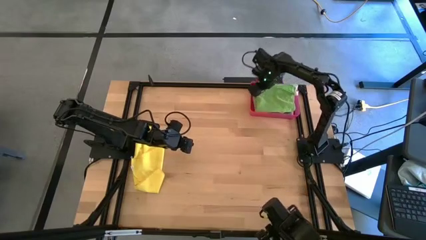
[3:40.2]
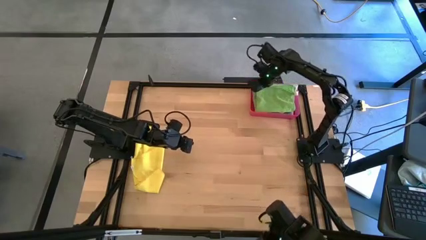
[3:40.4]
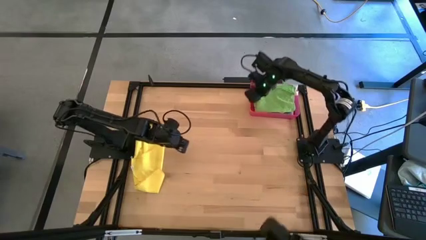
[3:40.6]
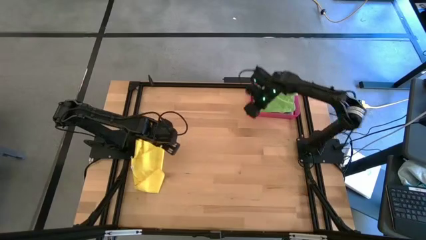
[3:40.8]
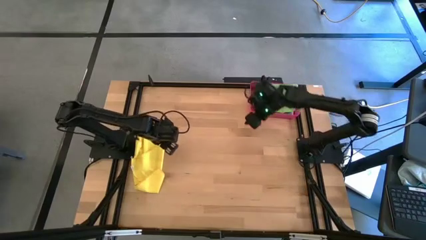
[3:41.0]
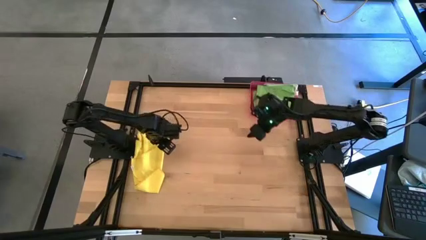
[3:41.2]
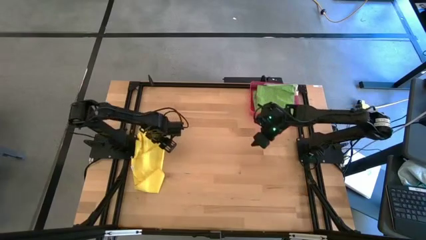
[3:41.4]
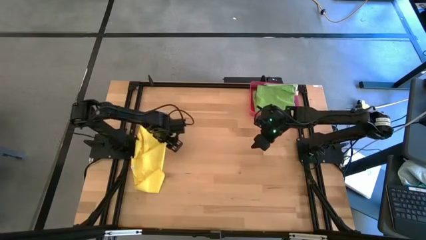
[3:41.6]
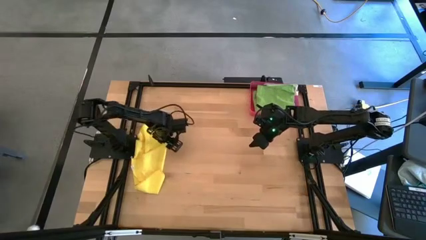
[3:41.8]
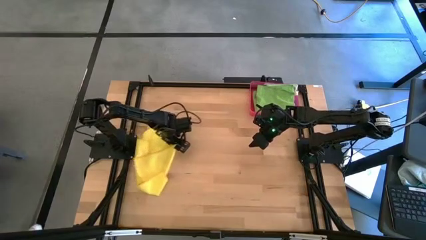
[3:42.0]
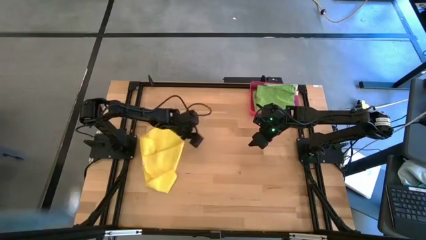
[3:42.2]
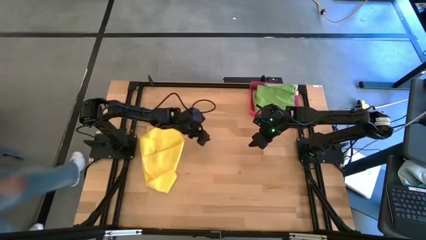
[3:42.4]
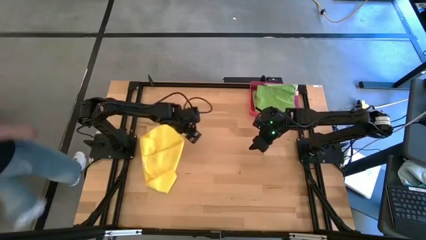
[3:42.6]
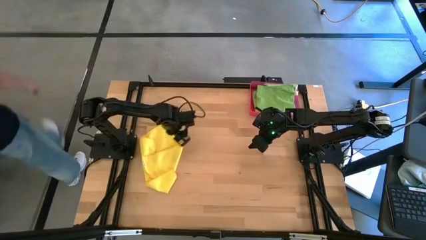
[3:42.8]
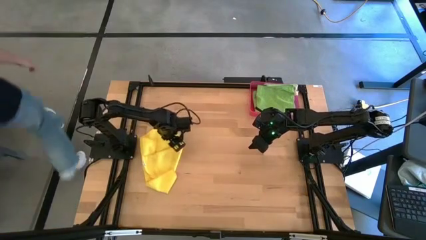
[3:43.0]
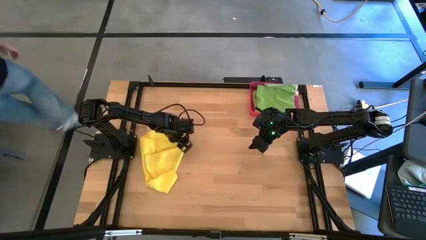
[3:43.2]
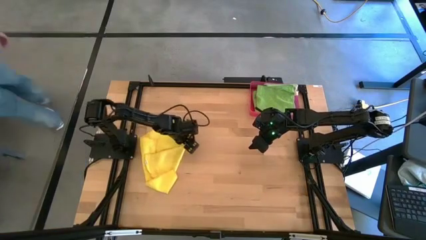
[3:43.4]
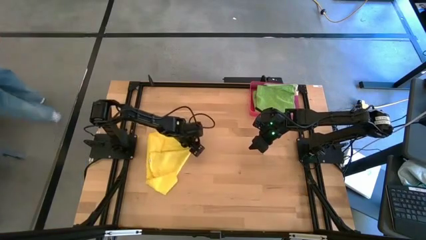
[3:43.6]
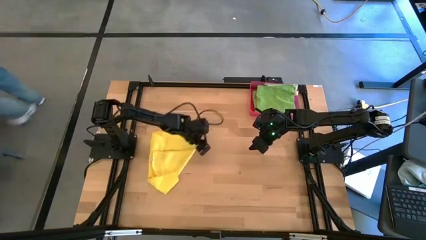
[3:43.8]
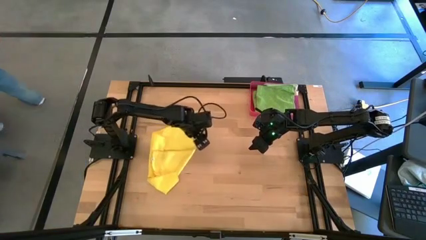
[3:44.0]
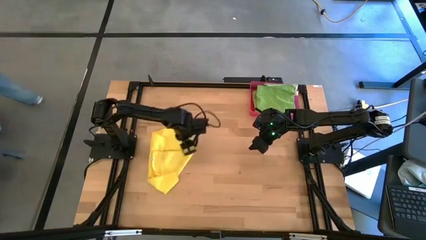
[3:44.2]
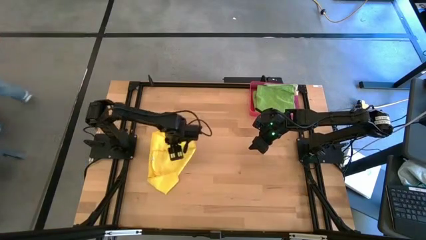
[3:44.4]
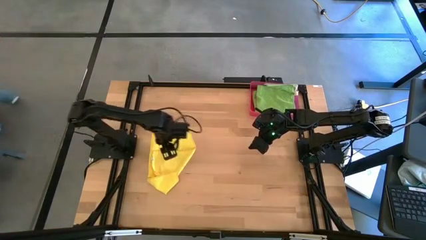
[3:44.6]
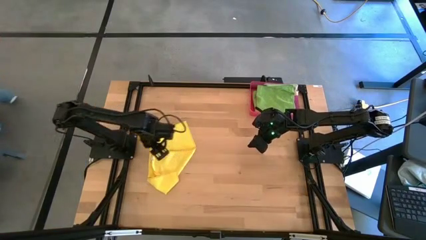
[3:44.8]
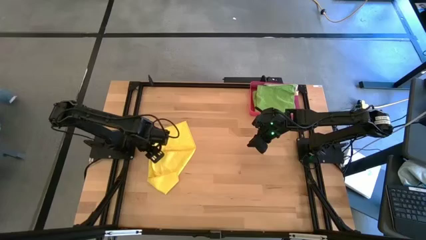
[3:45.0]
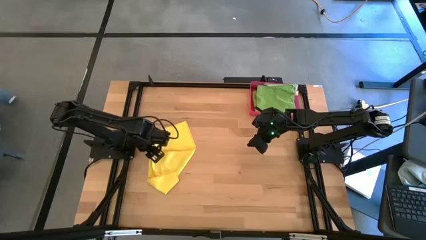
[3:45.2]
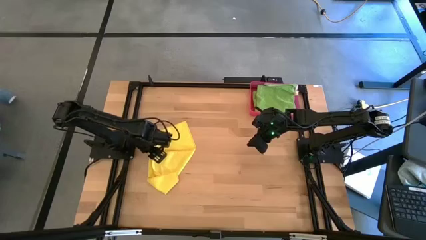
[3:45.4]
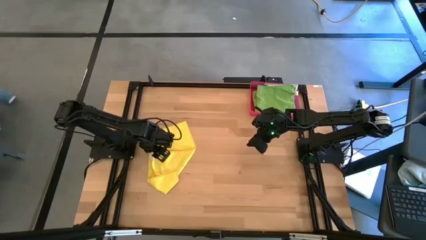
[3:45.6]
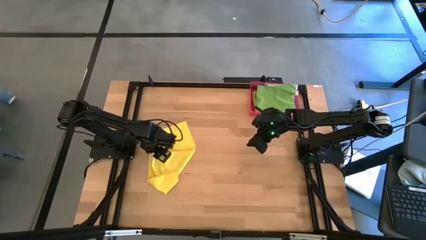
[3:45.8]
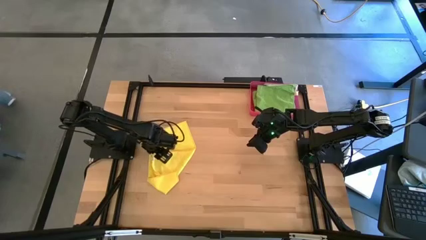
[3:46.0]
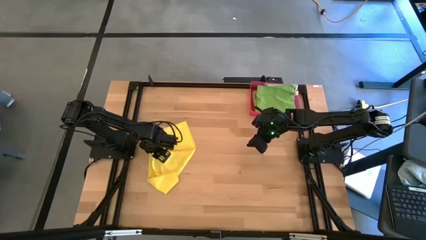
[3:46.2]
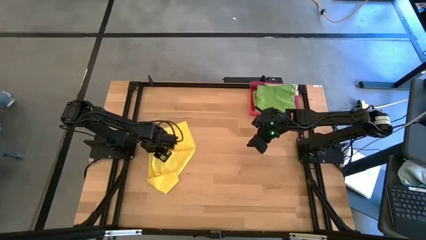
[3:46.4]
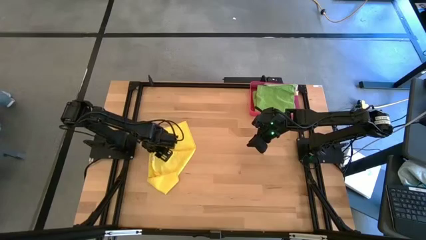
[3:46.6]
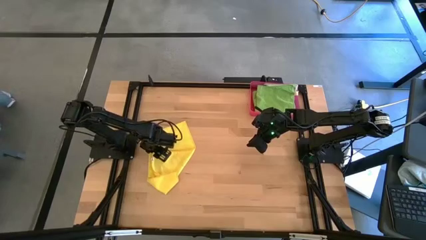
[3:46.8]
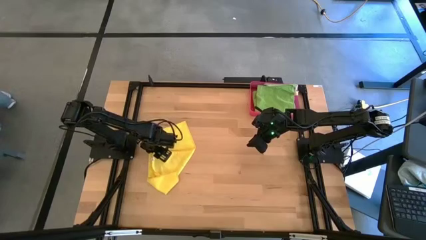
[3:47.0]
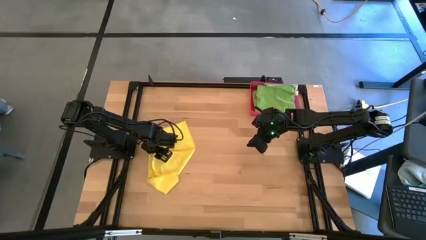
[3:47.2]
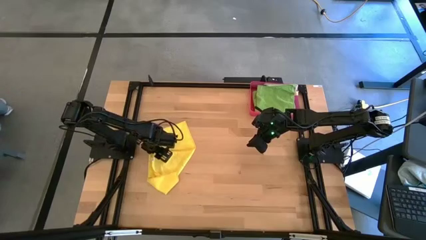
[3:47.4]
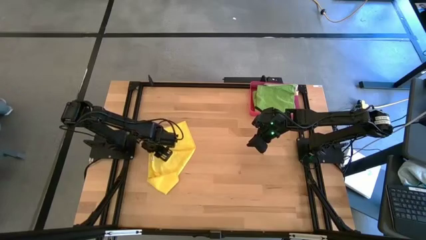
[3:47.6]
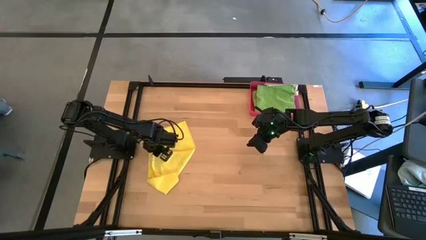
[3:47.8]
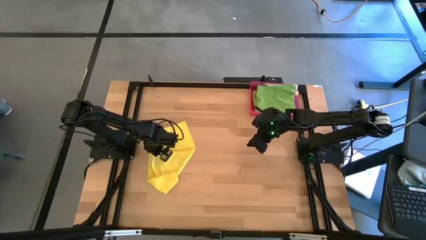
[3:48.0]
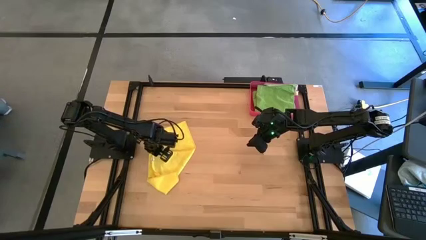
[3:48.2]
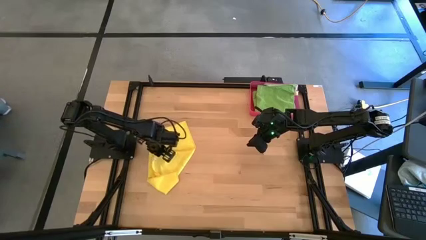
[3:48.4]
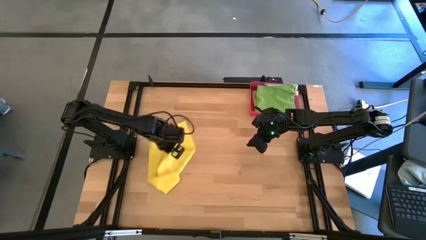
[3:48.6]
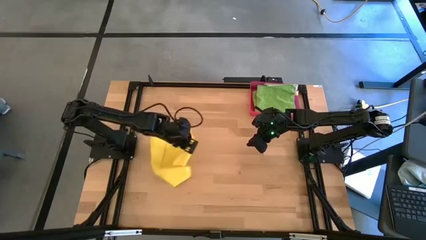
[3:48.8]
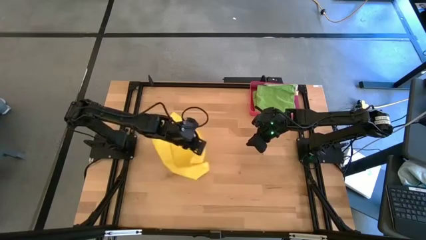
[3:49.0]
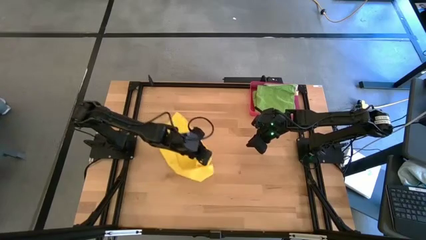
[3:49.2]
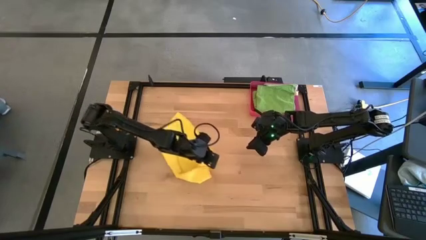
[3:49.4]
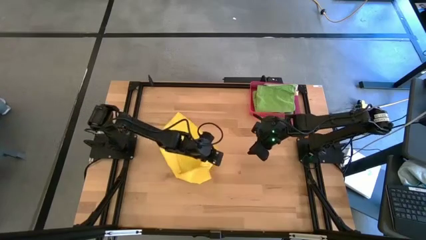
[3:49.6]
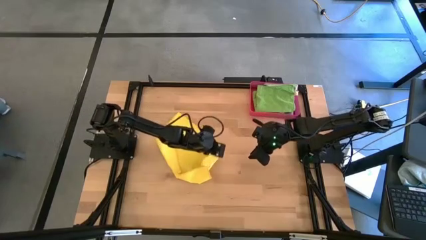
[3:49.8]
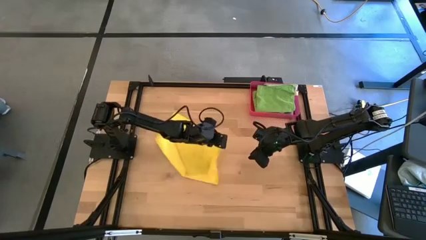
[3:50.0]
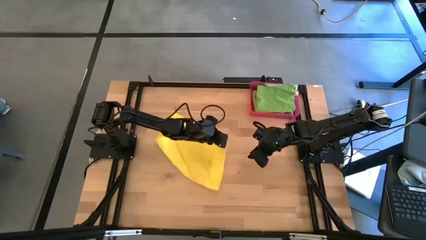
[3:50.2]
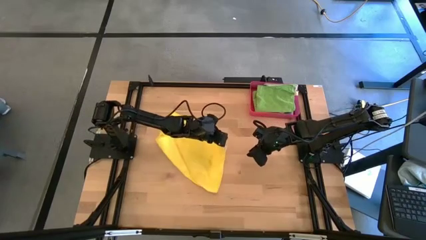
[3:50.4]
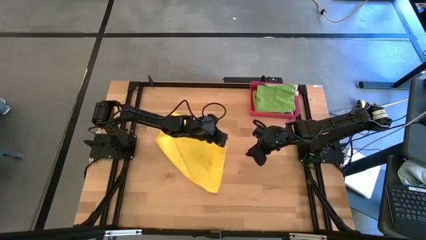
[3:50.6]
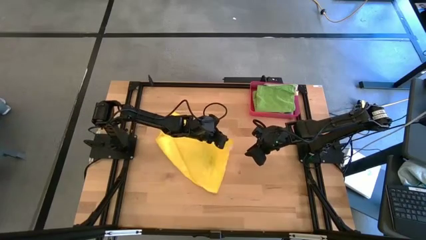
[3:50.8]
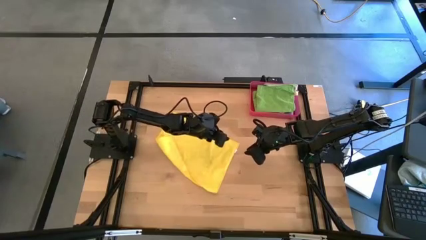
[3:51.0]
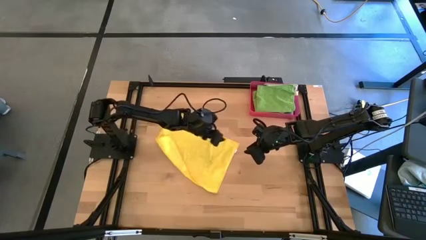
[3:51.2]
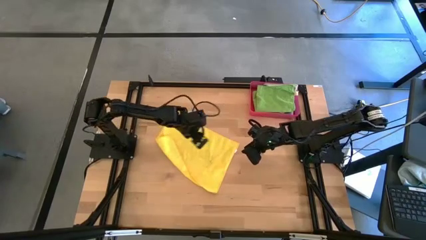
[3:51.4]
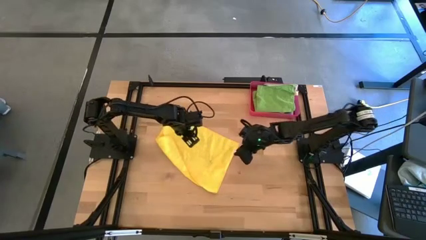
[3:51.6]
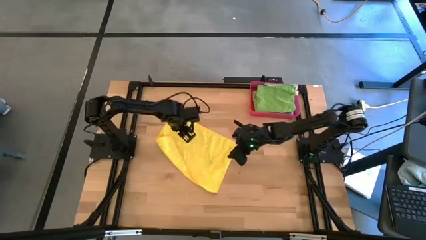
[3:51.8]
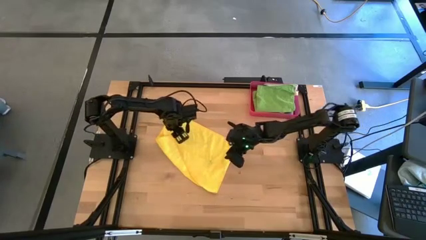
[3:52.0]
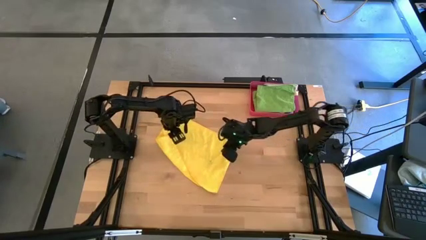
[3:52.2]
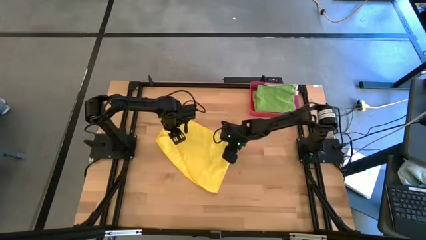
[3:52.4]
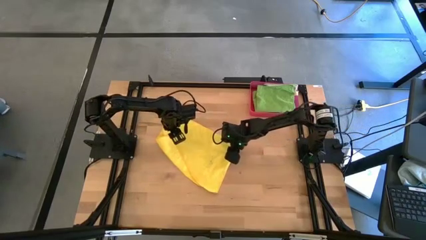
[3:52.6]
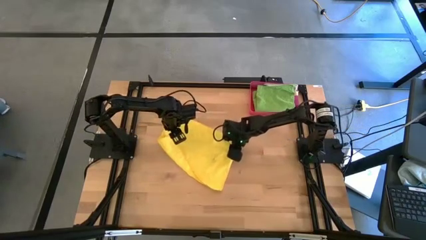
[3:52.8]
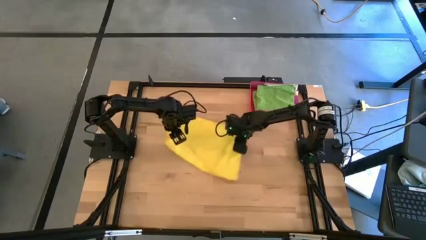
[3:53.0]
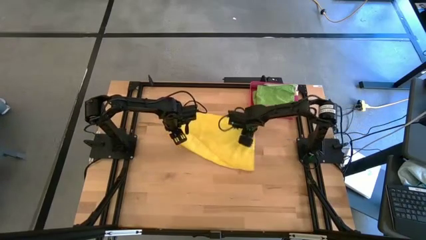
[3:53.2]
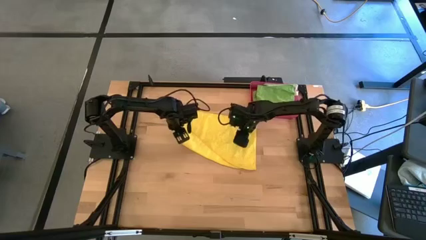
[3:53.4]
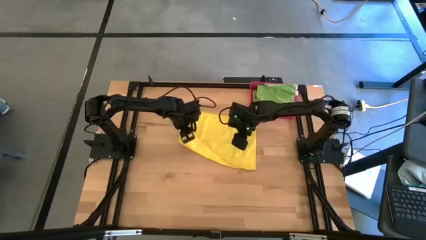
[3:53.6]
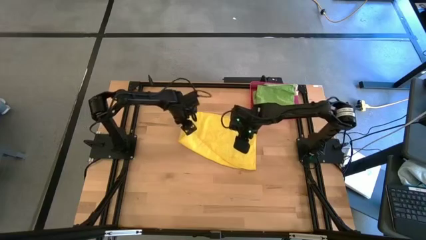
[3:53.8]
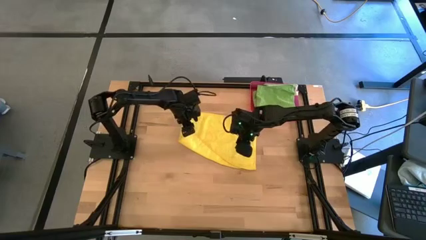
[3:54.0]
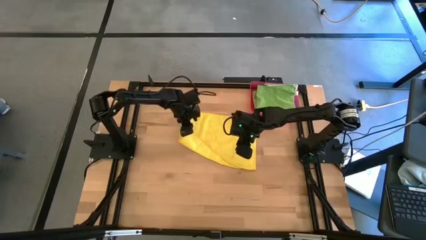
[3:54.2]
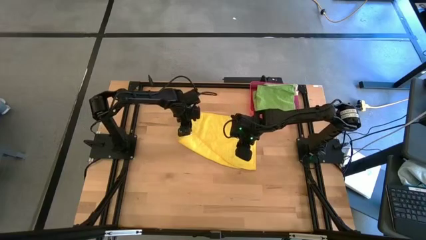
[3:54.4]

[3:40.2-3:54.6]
Task: Fold microfiber towels
Fold the yellow towel

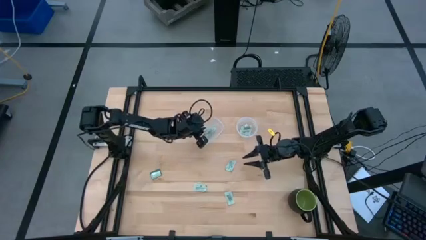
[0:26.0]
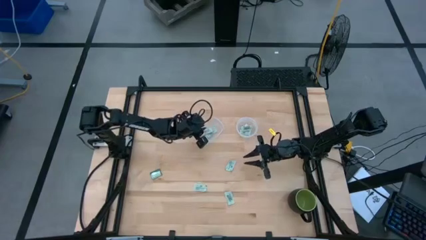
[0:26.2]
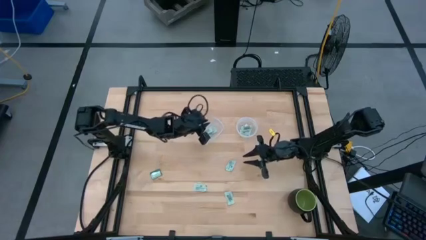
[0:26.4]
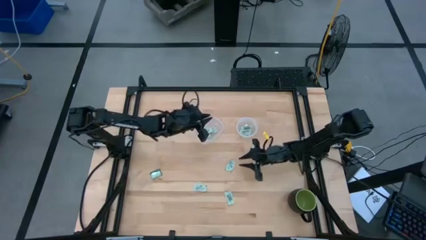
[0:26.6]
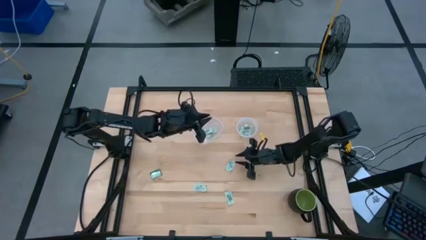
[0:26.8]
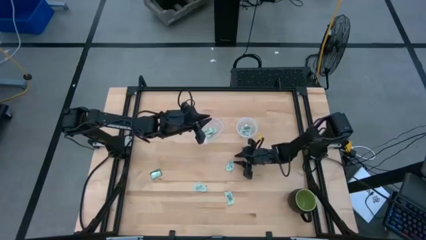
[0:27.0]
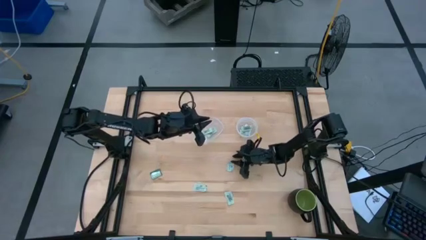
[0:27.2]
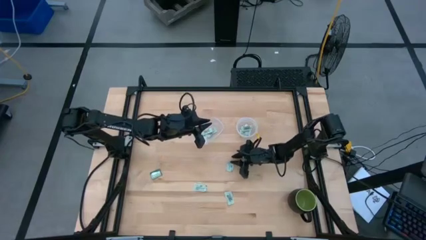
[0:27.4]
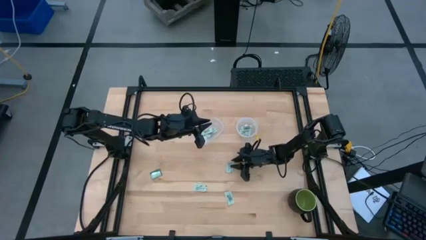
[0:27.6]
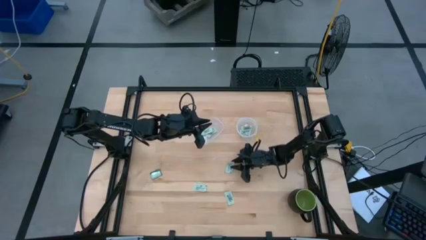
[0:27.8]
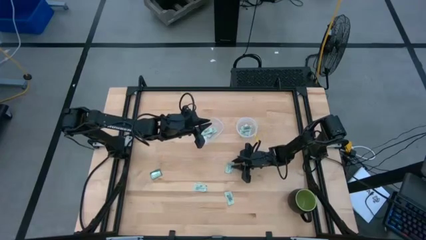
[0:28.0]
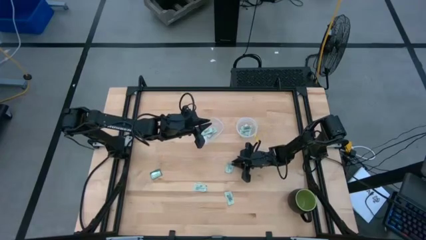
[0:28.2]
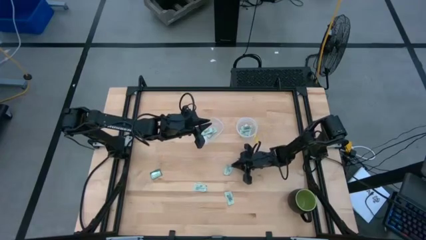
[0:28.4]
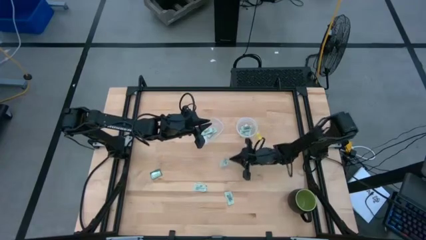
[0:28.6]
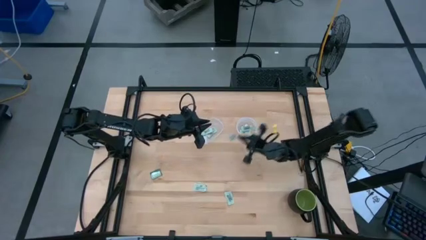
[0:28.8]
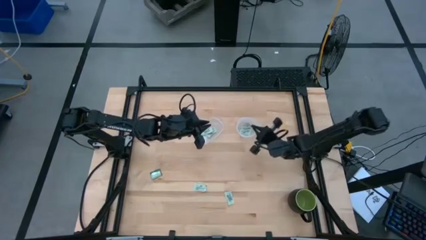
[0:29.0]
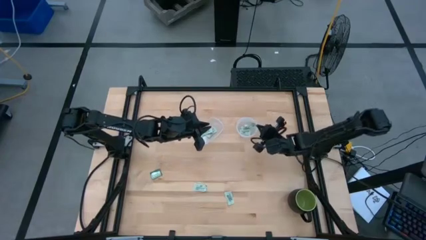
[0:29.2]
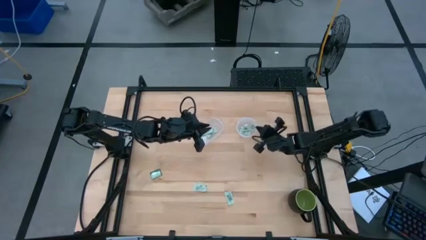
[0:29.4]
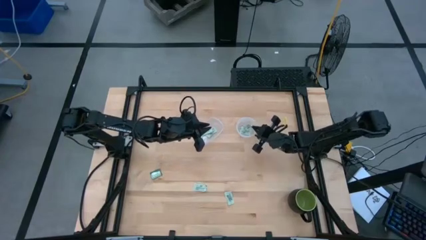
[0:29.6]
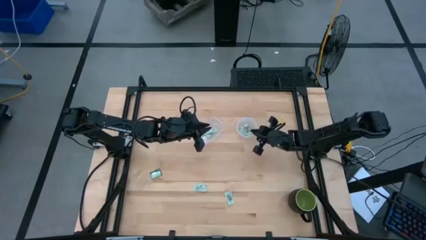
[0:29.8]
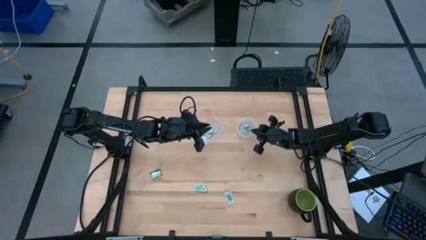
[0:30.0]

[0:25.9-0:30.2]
Task: Pick and place Stevia / Truvia into bins
Put the stevia packet into the right transparent container
